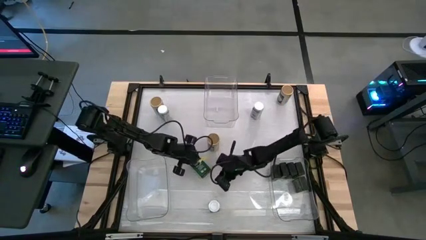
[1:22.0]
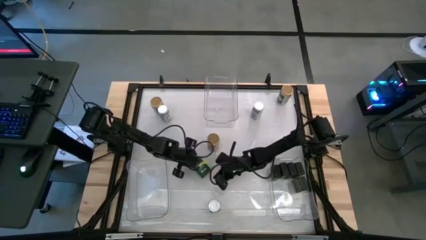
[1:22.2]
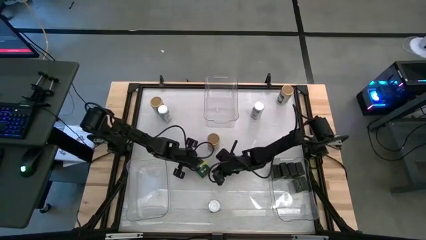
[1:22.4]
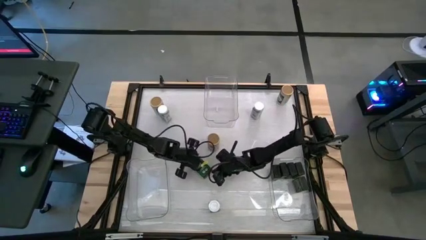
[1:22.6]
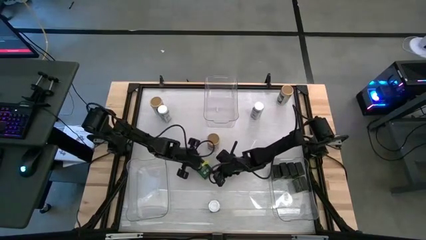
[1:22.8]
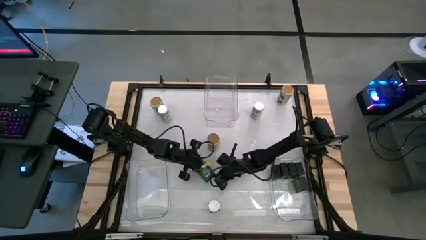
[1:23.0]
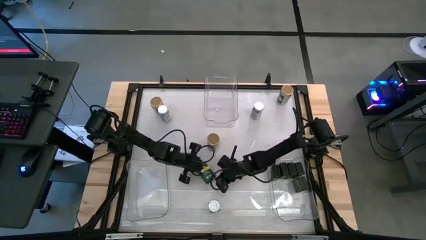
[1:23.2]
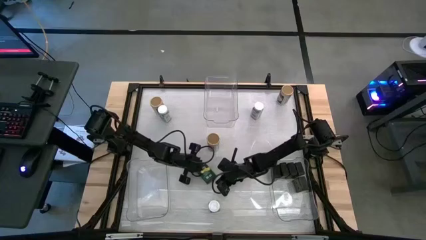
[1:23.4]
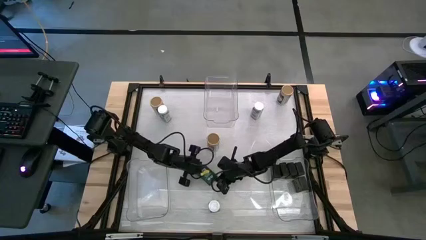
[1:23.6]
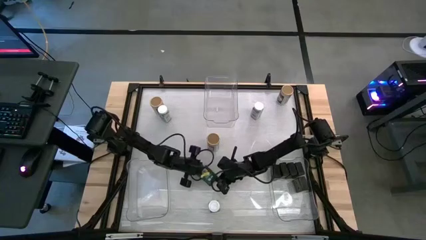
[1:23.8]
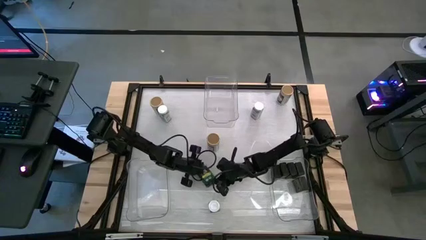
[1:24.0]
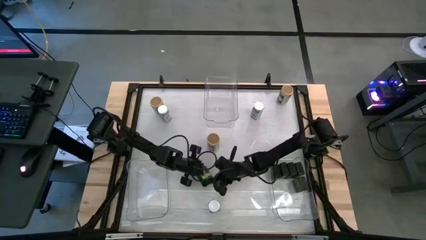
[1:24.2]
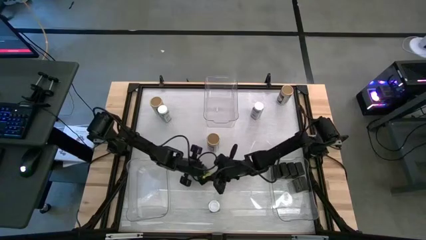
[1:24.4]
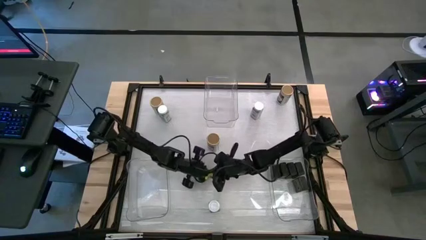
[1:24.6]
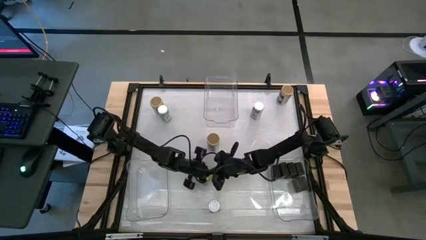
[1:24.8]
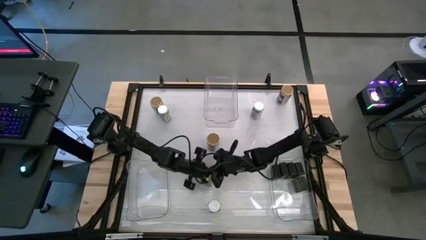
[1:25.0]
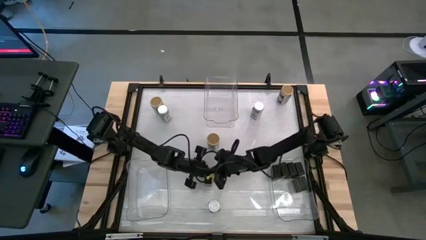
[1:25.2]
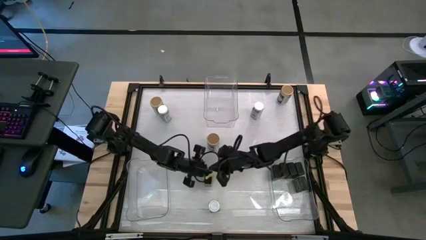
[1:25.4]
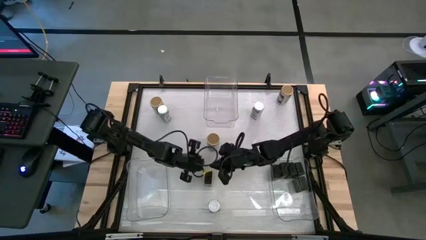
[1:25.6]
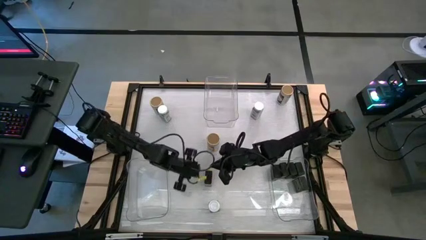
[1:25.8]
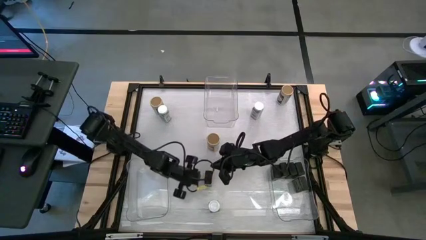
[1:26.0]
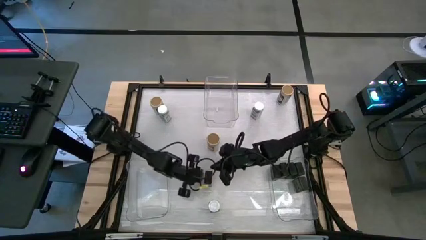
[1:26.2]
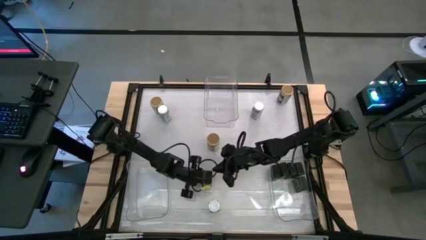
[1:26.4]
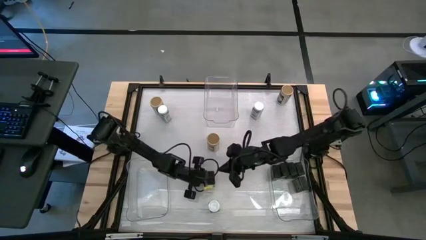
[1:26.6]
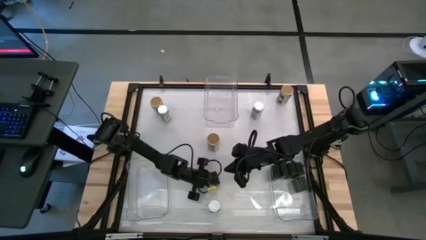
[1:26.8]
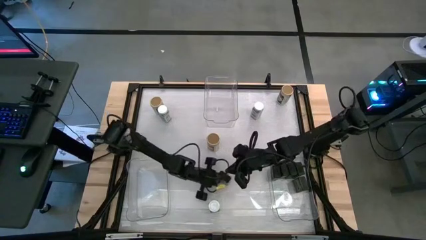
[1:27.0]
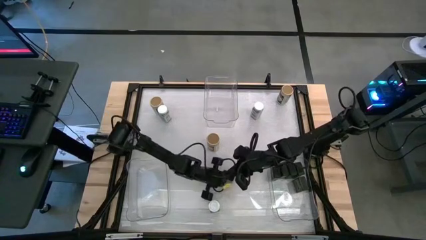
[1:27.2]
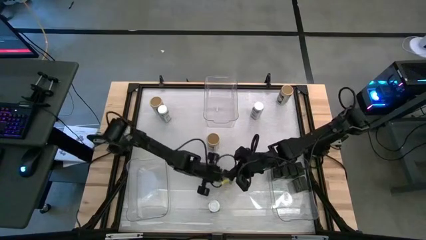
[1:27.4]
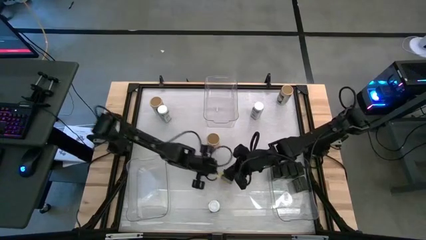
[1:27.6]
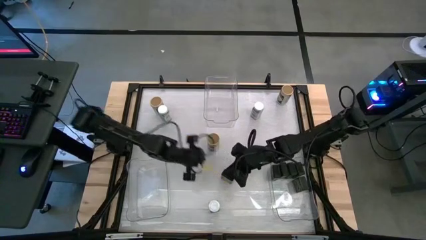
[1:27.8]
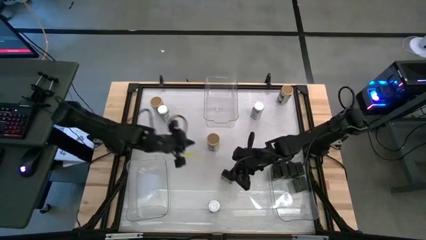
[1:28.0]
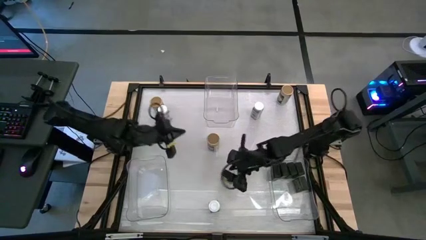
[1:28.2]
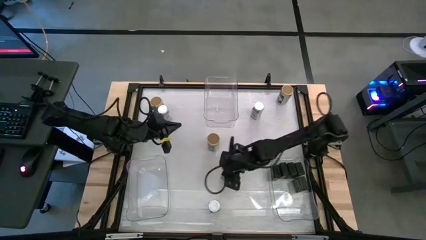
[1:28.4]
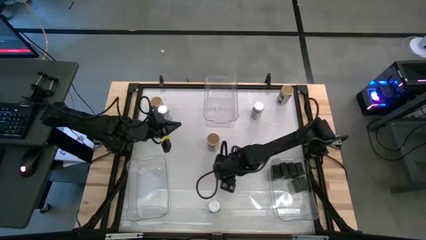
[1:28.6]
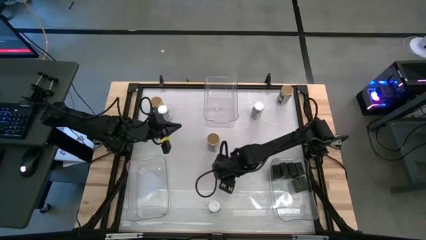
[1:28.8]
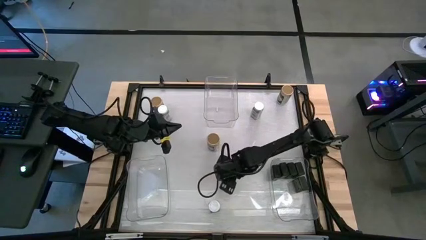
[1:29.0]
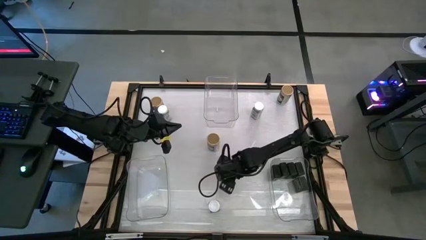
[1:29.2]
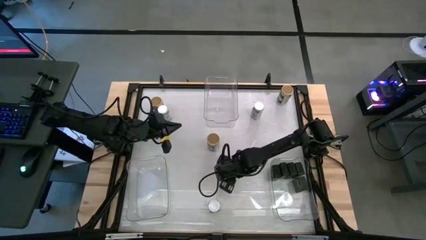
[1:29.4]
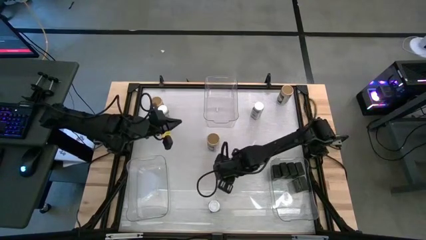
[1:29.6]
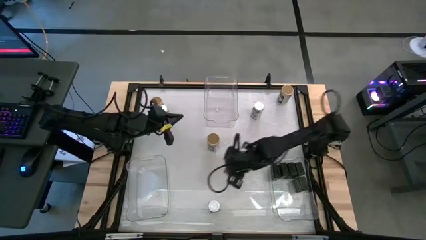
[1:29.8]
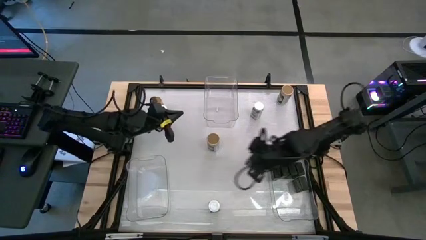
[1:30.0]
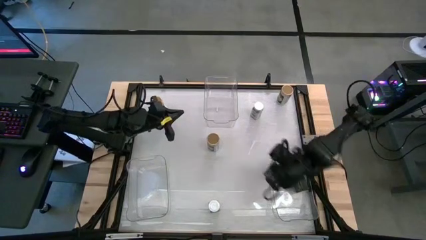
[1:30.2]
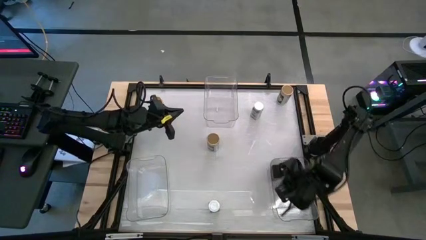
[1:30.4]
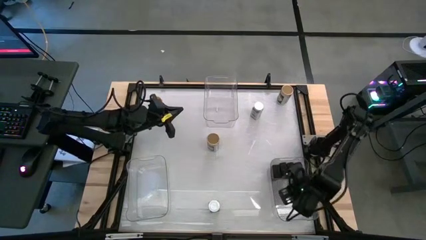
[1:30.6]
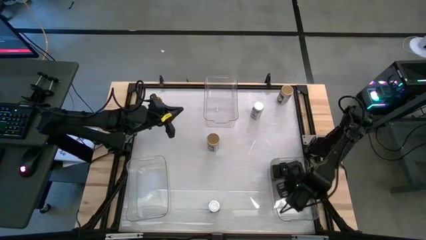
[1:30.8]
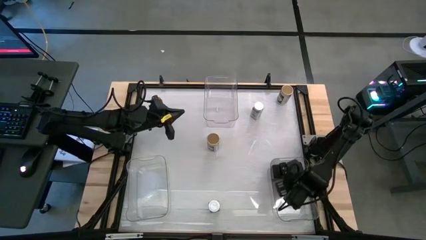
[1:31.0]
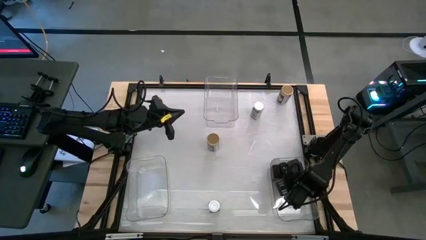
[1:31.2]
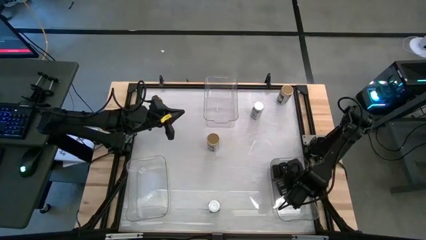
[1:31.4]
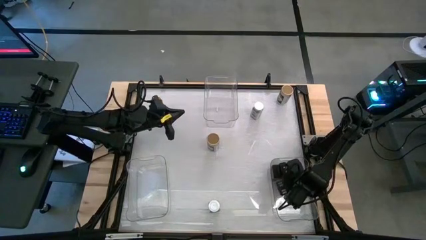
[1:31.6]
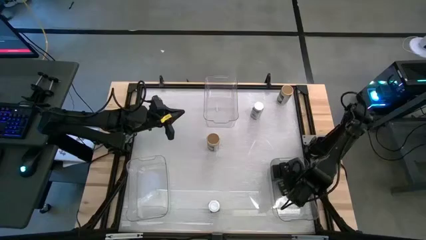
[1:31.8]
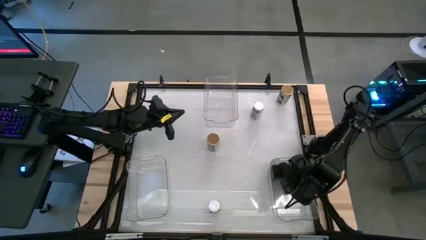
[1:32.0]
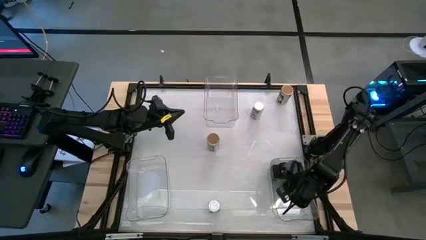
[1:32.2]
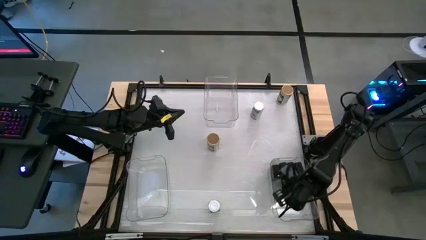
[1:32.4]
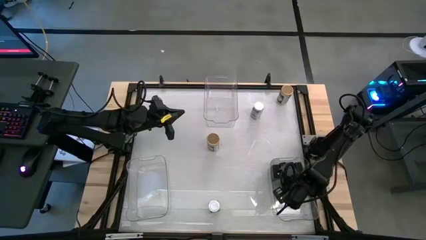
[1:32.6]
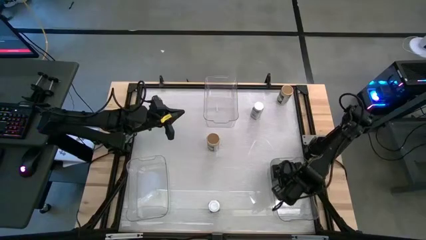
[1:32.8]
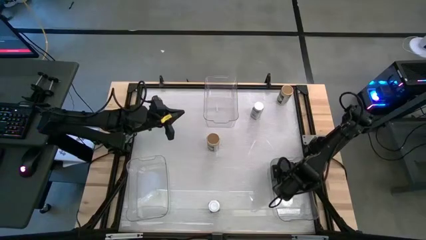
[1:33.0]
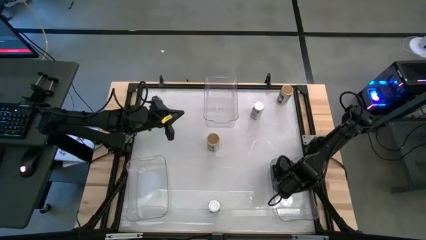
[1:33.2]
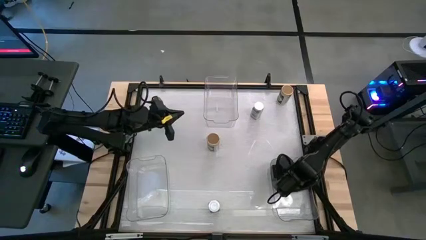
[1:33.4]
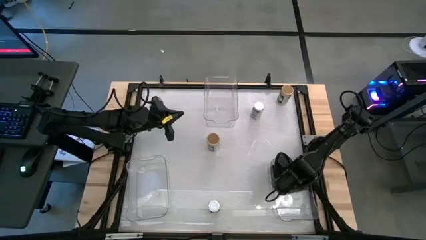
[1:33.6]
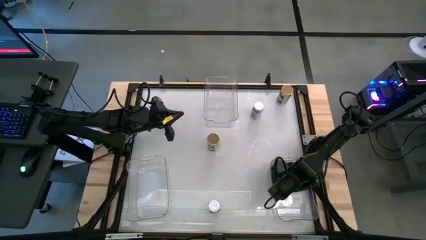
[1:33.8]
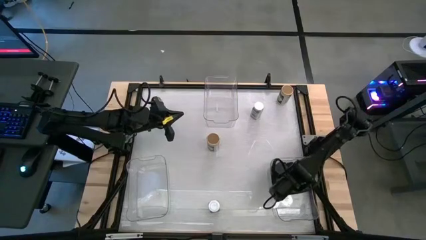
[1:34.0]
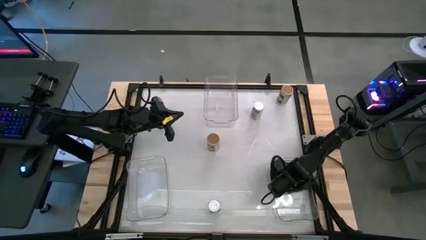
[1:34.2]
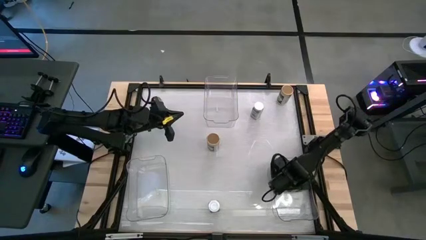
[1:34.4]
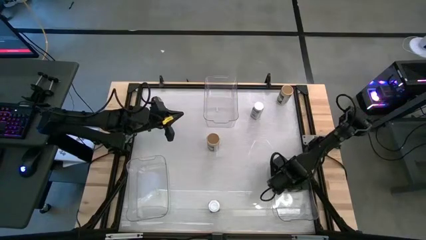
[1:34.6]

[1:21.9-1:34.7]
Task: Sort spices by type
Put the black spice can into the right transparent bin

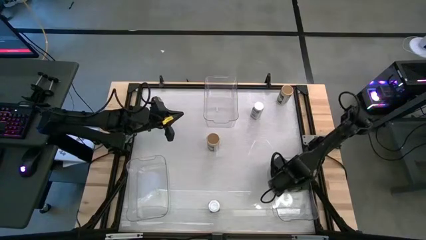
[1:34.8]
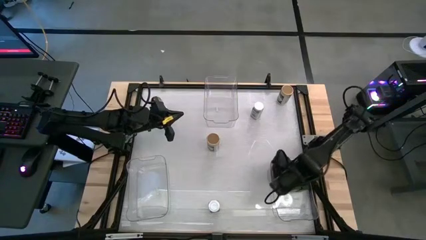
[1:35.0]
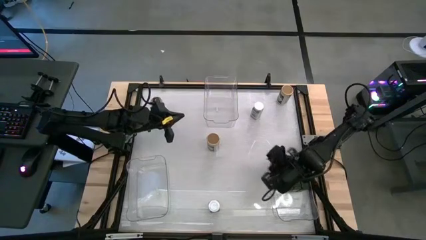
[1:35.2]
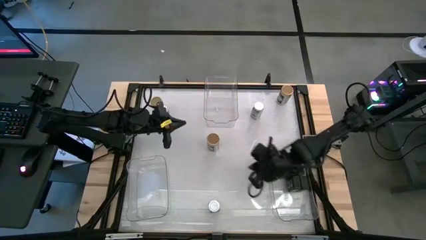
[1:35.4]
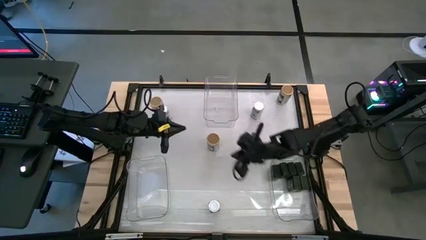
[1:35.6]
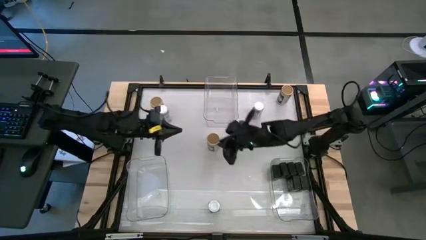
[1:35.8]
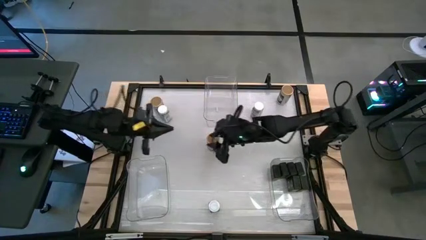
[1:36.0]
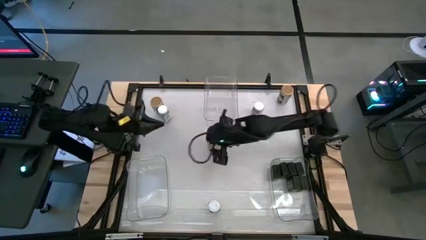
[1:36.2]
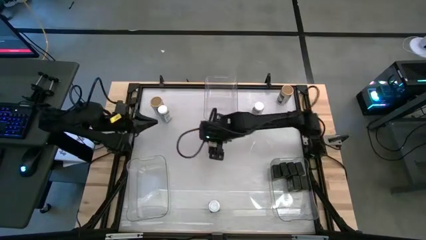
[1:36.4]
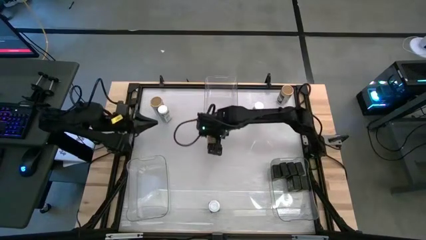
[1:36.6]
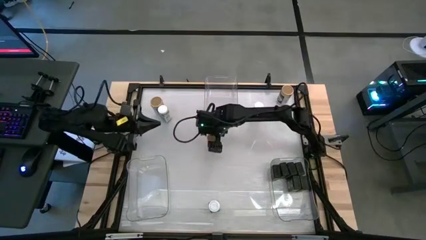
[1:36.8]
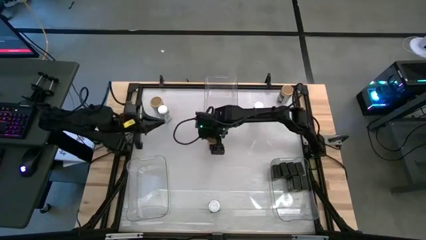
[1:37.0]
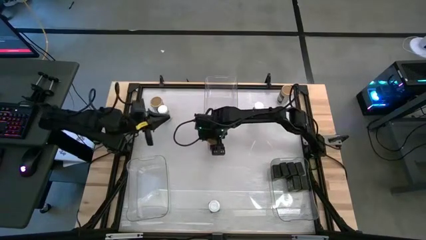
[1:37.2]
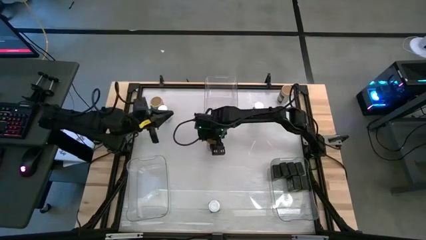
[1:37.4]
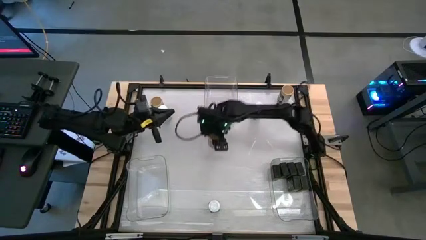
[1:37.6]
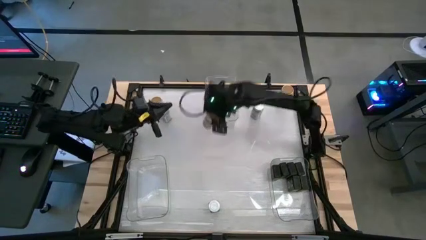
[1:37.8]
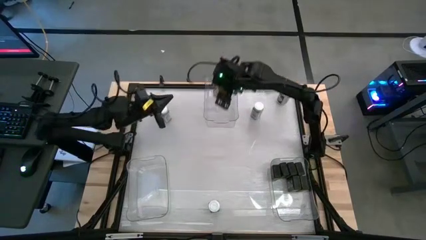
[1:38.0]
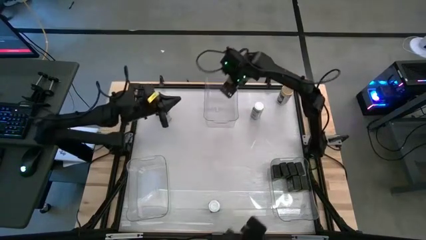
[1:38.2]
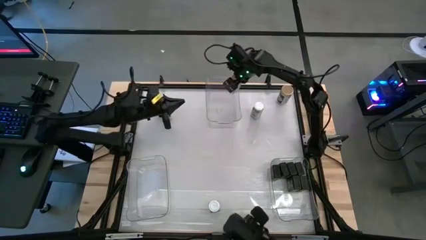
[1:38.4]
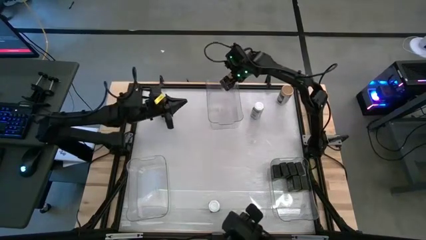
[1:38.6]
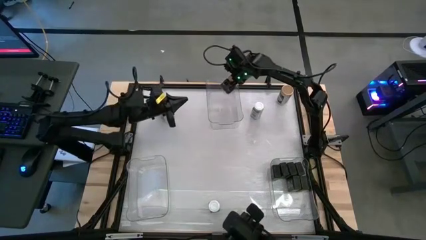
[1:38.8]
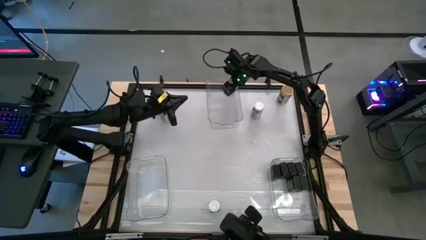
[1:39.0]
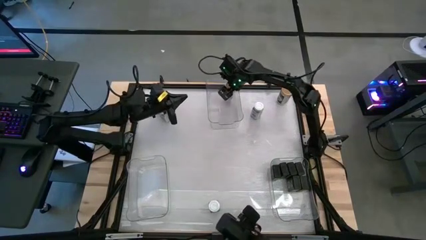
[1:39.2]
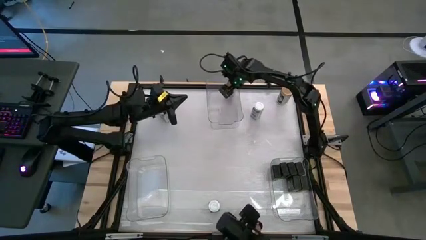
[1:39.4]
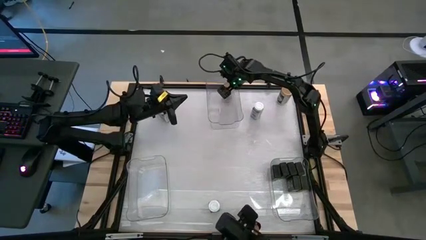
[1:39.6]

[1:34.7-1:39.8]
Put the gold spice bottle into the top transparent bin
